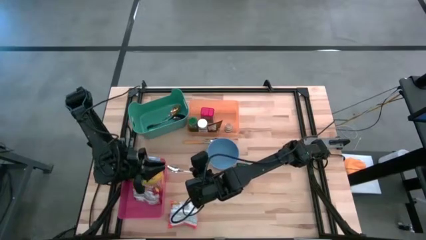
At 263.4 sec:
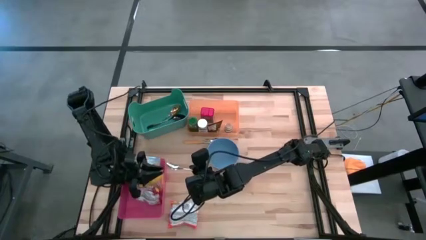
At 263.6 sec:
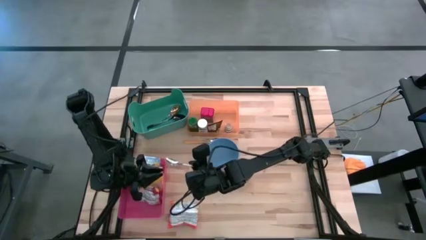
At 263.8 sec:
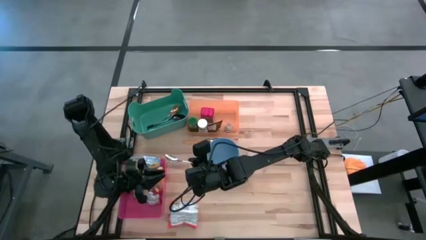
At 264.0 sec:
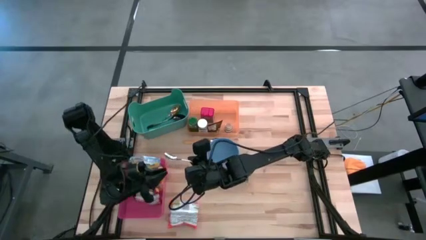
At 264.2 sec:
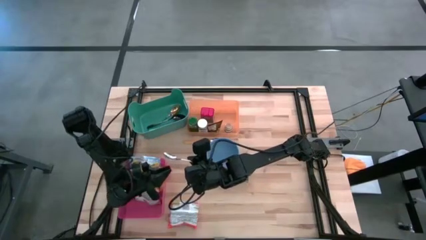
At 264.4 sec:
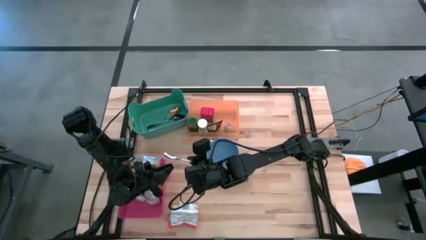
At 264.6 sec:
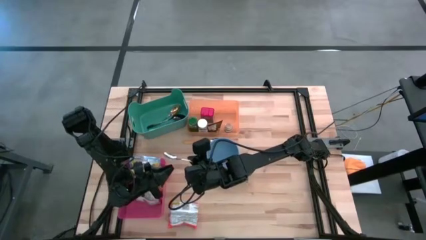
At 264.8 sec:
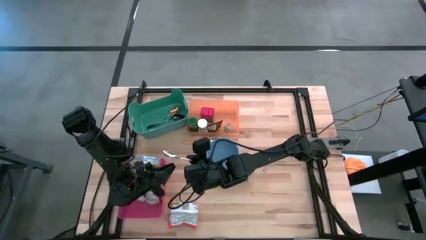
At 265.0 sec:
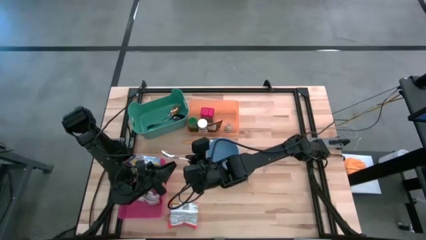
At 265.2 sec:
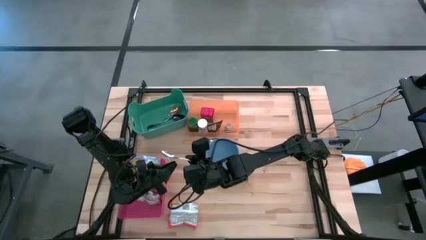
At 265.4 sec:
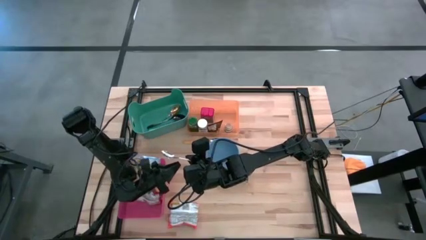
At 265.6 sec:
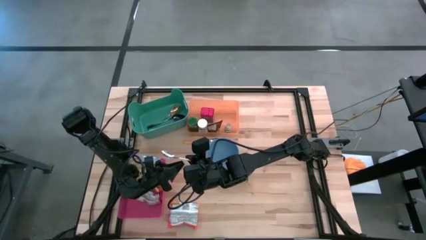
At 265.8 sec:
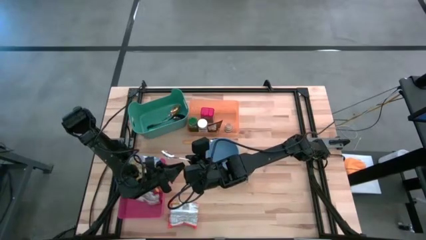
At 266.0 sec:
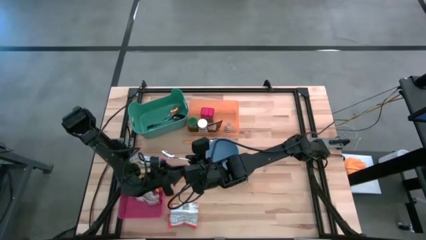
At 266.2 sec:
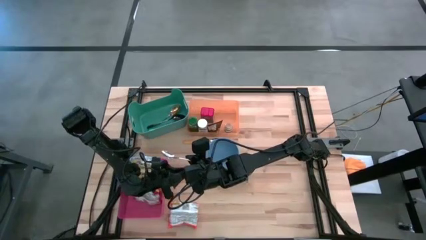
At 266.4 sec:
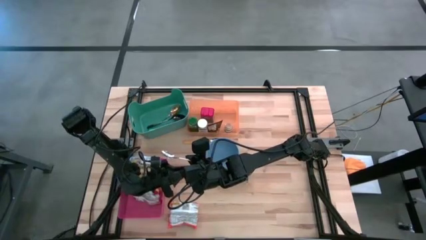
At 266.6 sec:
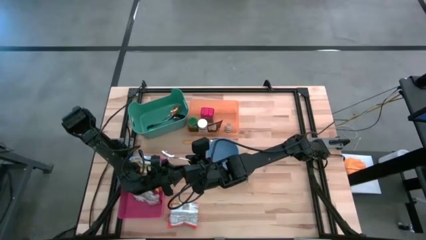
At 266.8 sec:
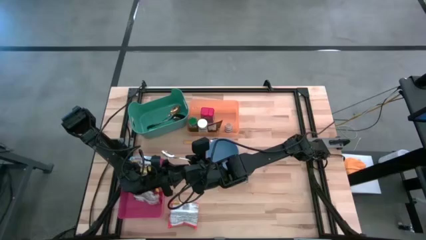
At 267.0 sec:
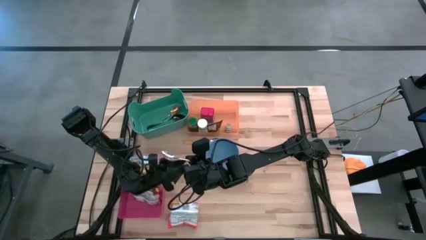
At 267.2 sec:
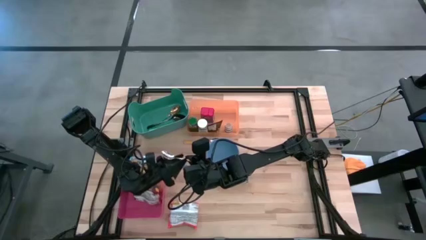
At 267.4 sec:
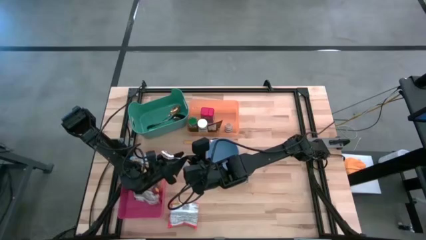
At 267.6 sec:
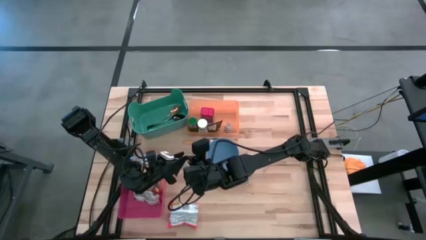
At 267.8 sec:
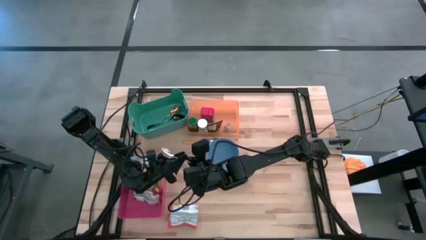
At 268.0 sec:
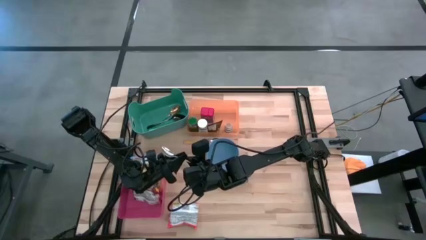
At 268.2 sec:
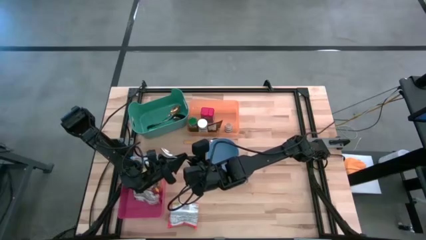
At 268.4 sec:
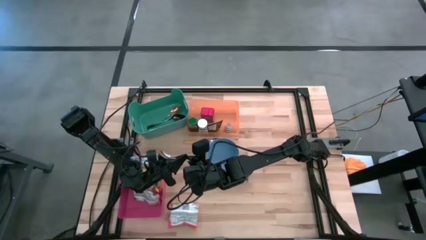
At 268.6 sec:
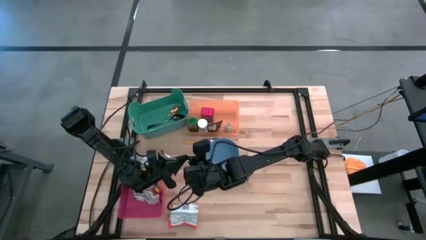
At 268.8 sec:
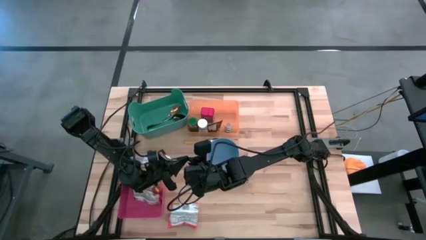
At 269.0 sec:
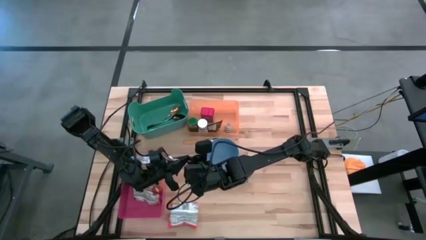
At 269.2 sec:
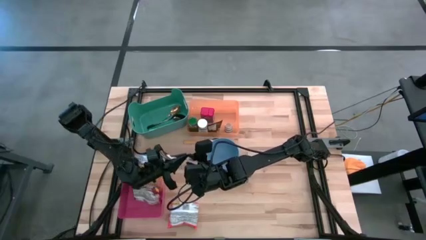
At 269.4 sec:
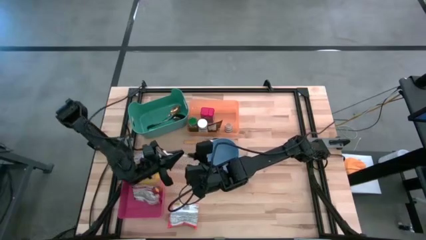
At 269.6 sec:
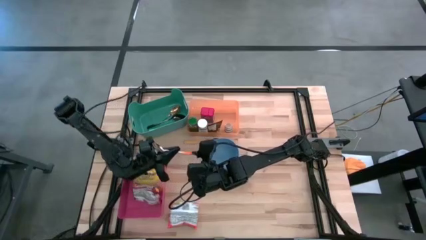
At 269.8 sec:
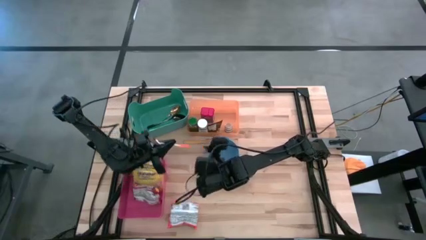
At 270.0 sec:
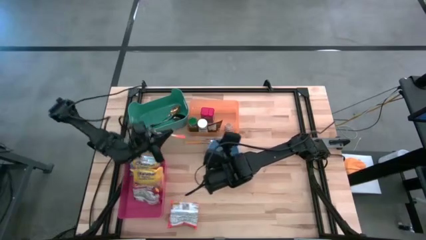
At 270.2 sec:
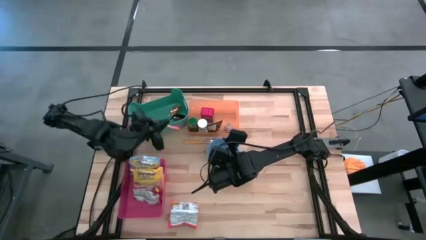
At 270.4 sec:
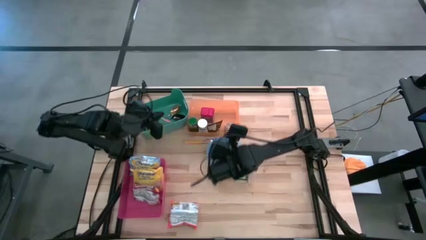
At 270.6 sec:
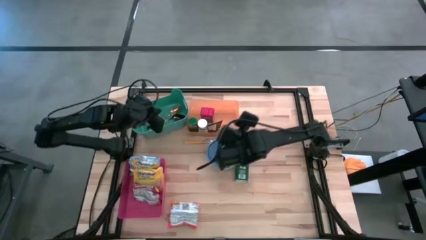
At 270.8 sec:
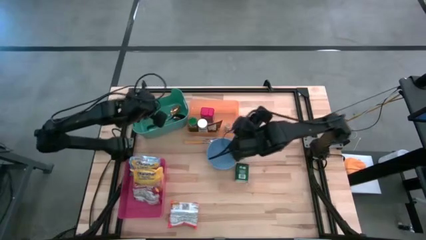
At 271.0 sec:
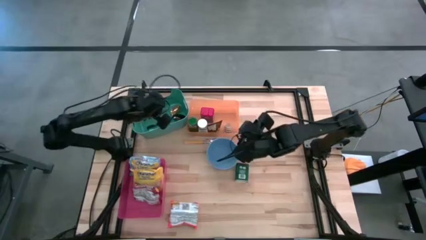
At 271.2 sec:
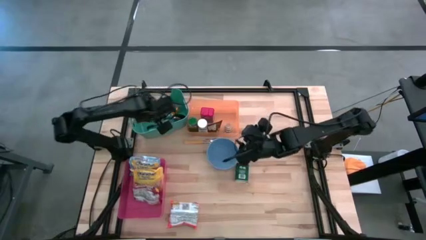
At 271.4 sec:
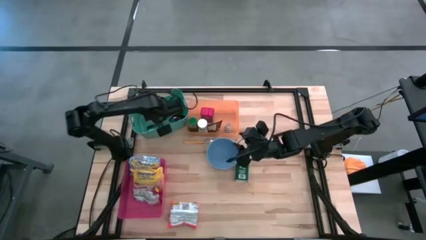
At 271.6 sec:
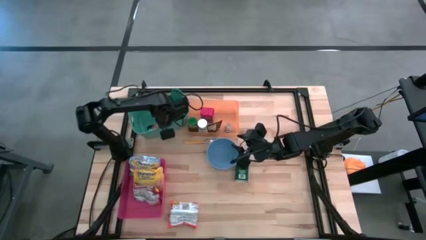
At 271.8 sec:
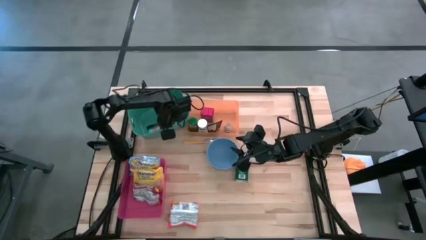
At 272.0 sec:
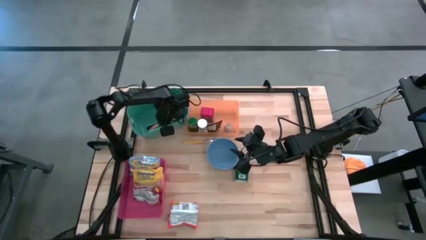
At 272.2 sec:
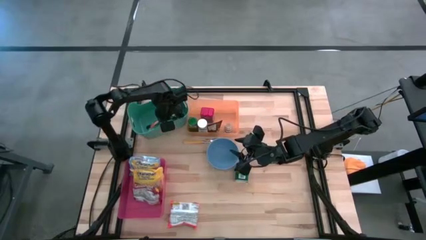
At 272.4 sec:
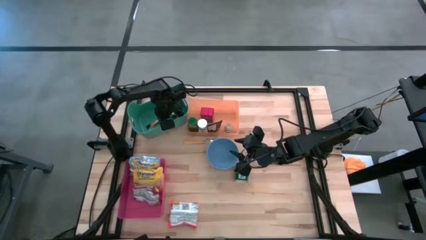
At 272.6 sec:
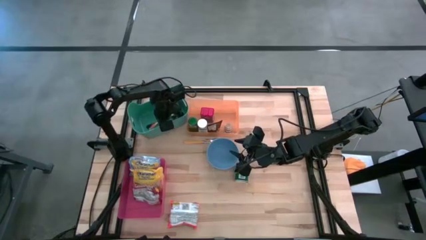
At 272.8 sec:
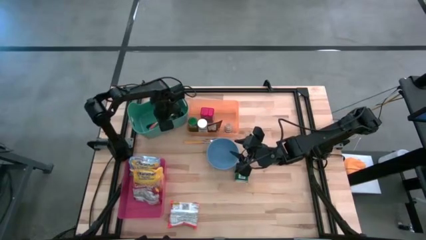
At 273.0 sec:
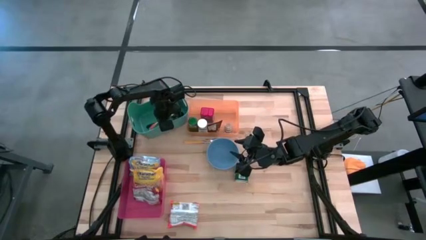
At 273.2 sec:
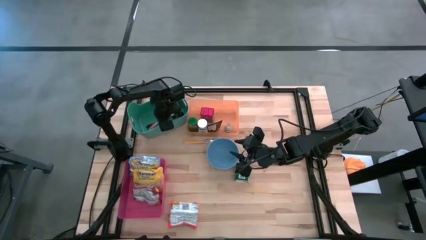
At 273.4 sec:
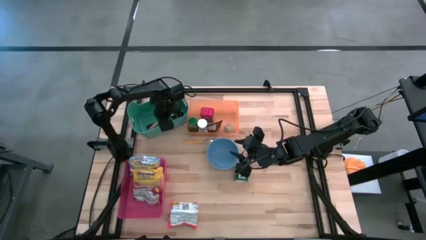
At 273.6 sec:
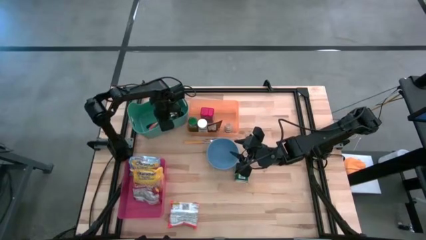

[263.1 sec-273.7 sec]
Put the orange spoon into the green bin
